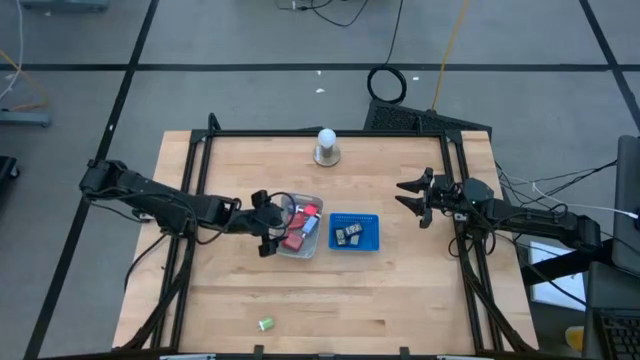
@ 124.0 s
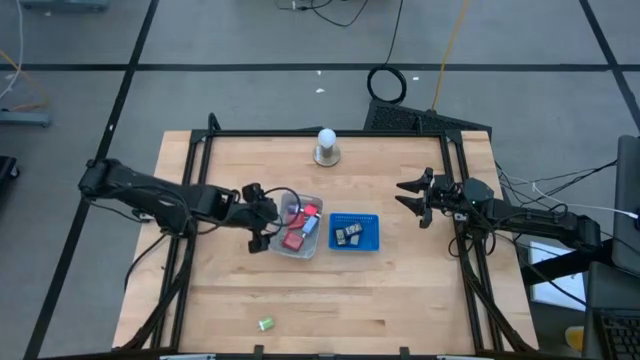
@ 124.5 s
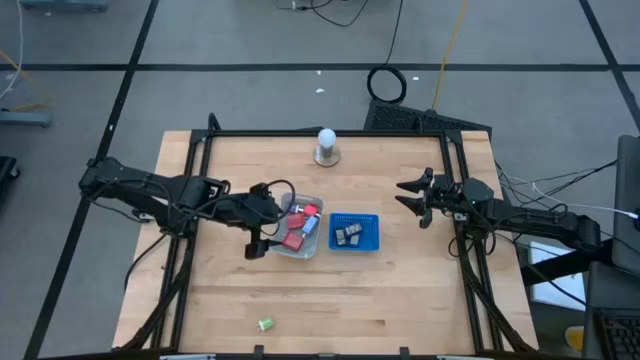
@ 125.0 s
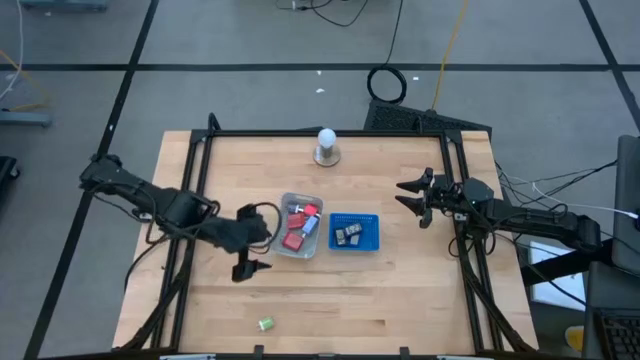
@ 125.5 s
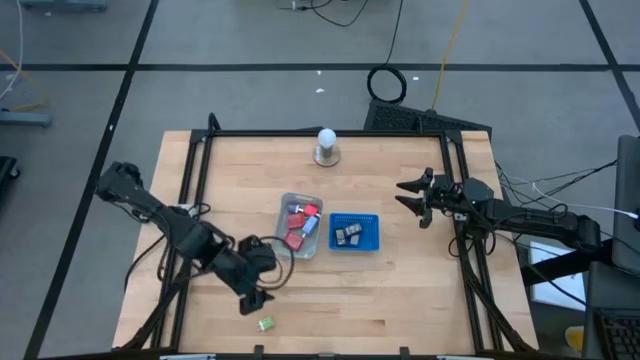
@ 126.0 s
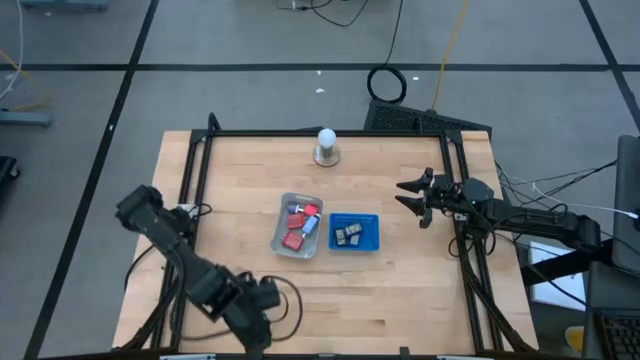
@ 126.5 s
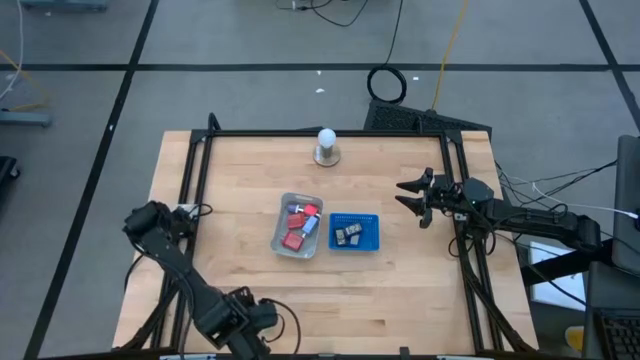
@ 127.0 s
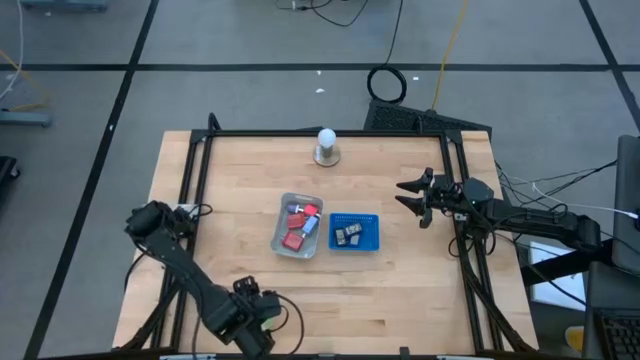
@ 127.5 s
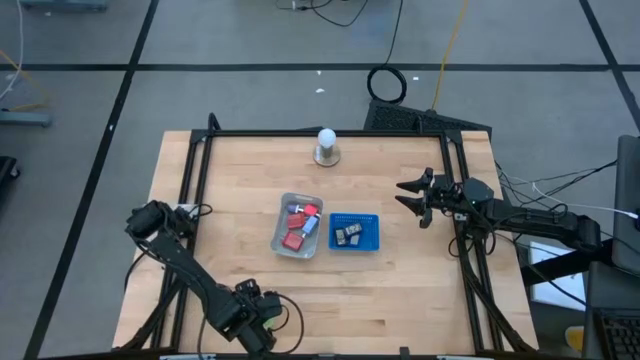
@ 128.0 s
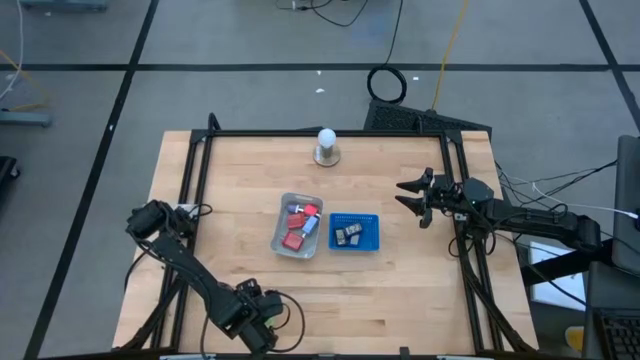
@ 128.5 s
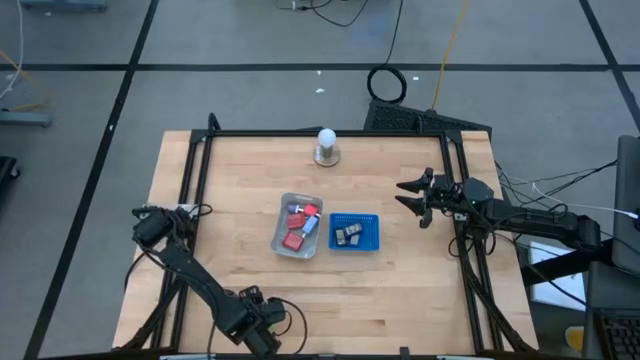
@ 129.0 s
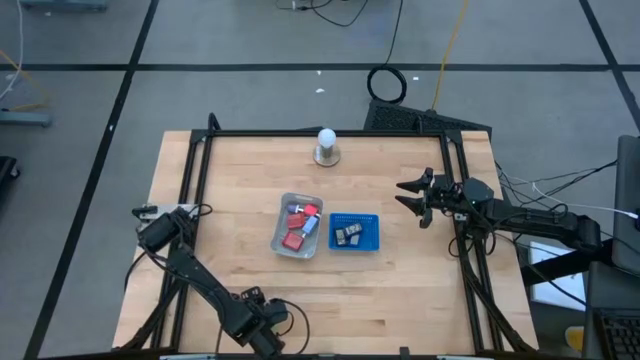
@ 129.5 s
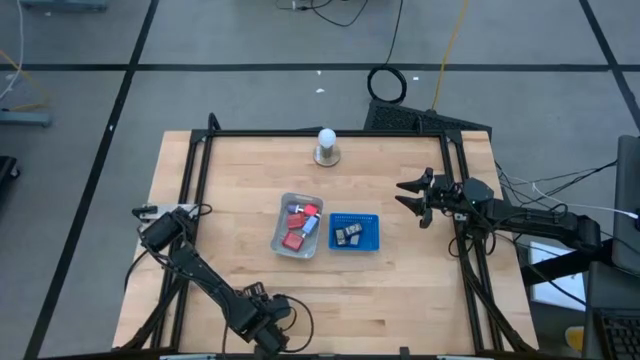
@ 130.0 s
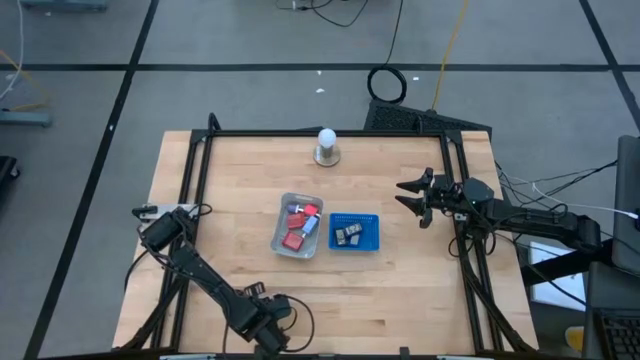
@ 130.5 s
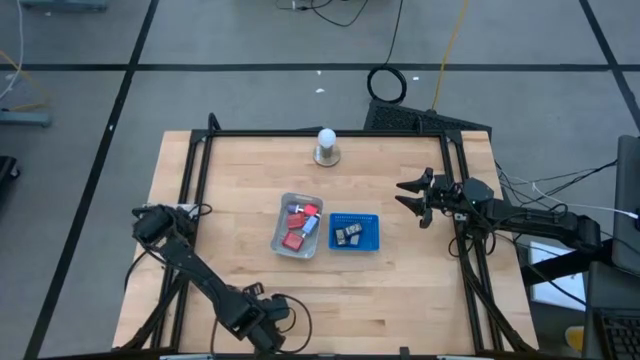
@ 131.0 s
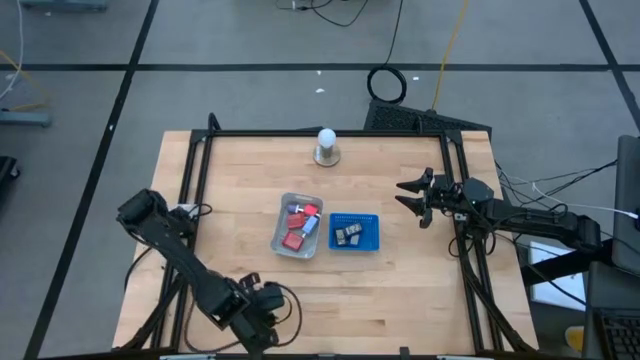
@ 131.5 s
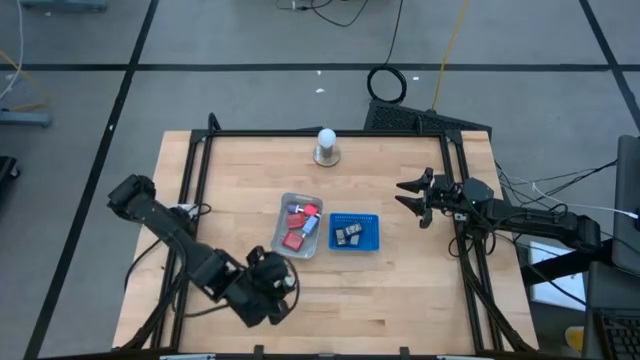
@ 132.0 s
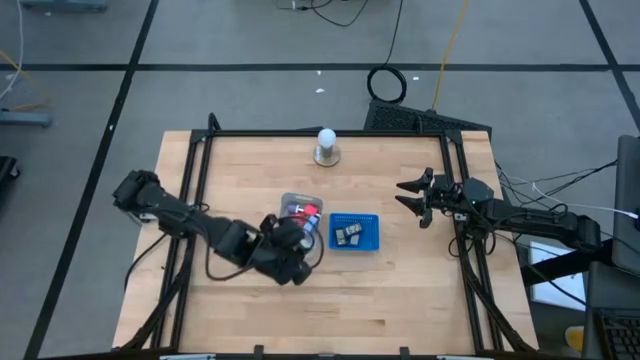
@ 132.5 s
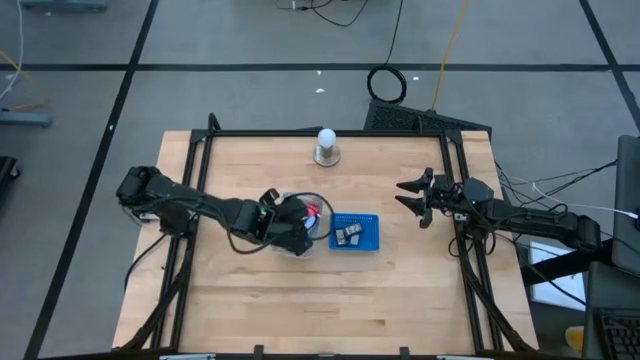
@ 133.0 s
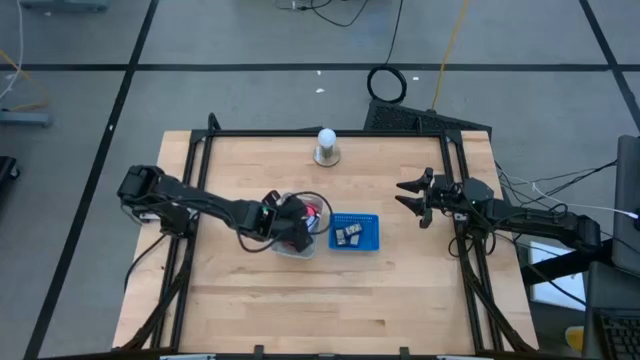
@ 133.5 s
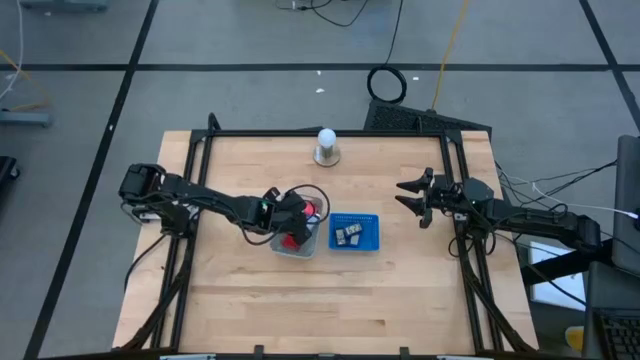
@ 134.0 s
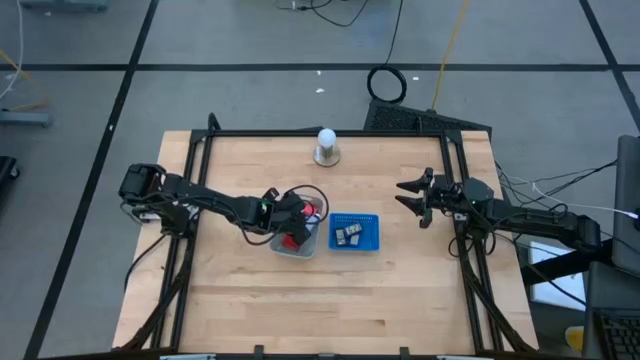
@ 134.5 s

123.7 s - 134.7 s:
Task: Pick & Place Office items
Put the green charger adapter into the gray bin

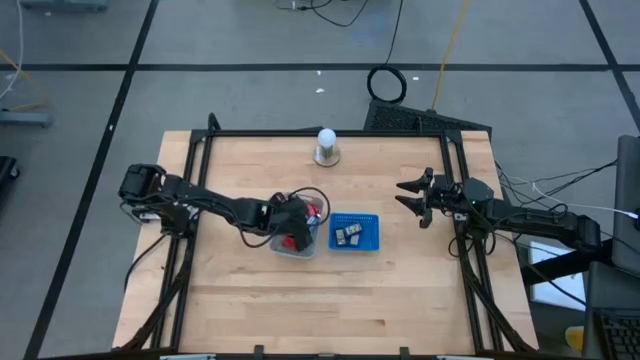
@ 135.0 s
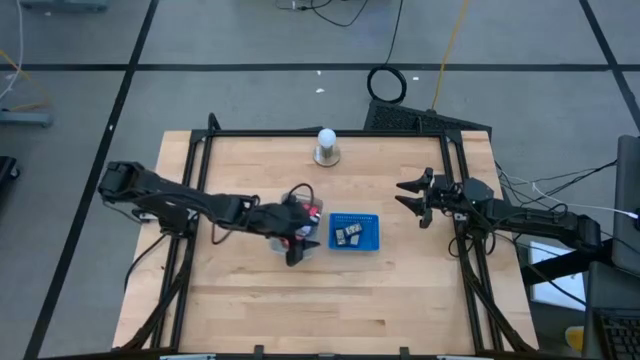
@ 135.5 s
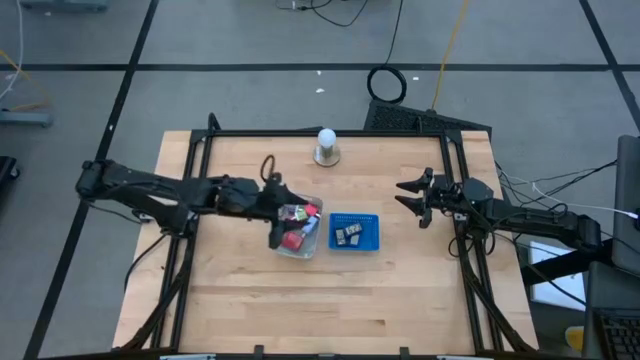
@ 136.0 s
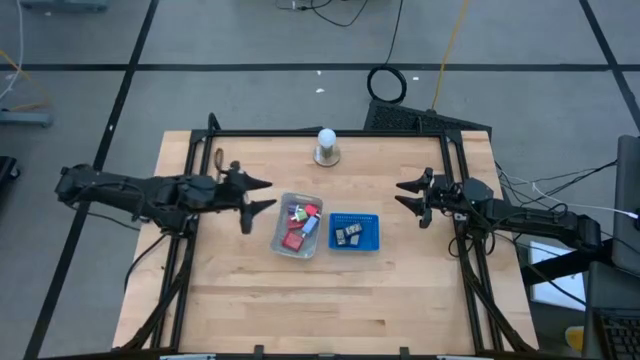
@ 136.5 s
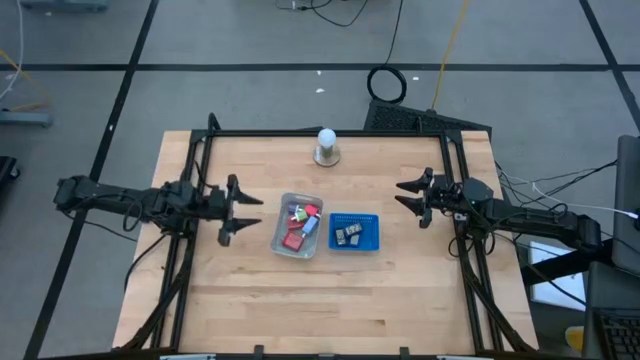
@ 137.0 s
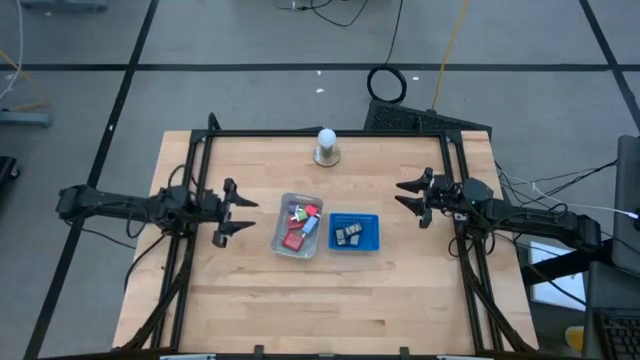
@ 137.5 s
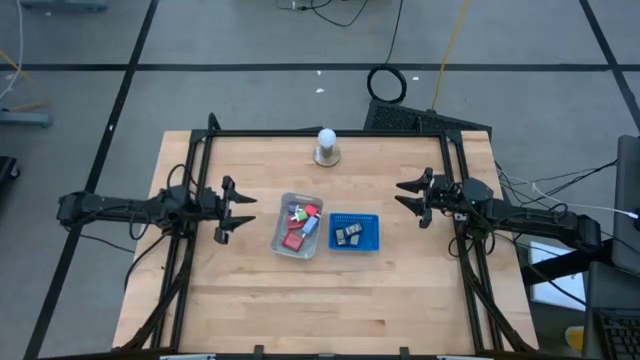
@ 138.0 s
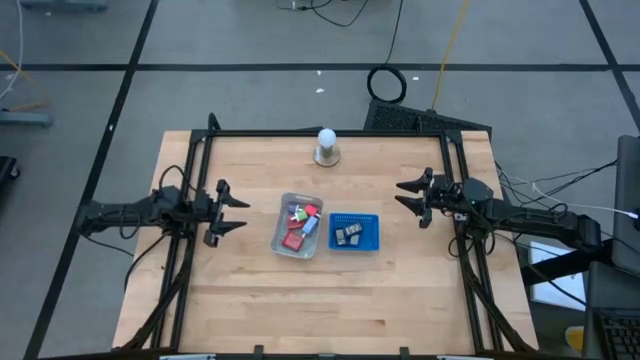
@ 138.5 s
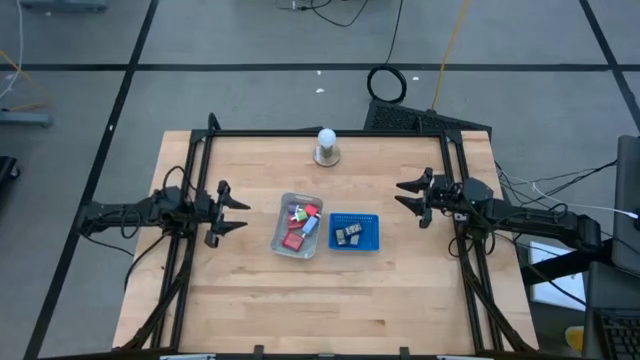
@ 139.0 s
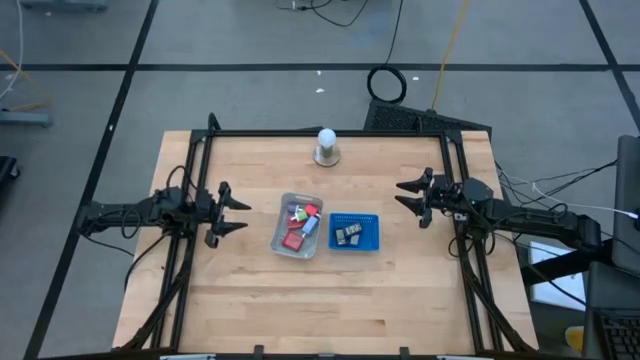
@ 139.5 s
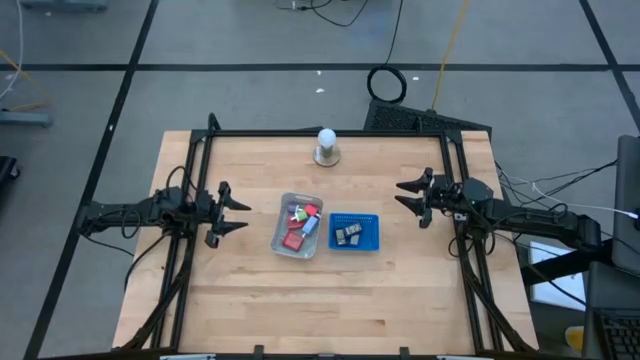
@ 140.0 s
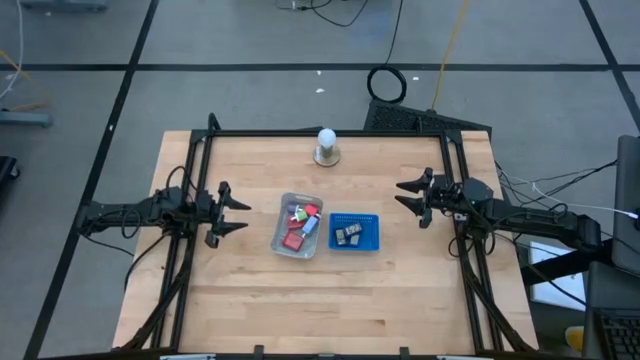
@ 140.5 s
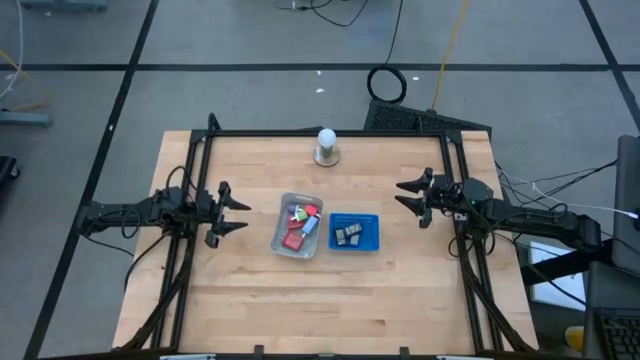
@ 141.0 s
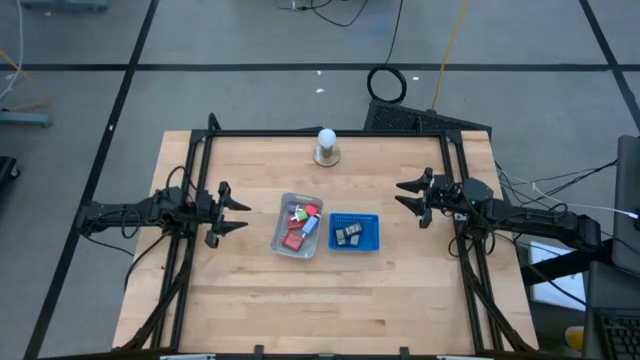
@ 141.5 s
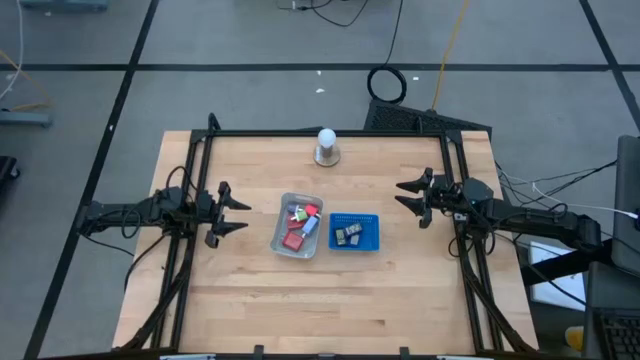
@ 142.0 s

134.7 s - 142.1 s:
Return to Home Position

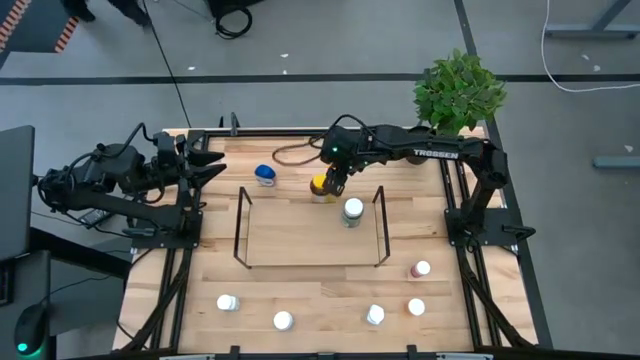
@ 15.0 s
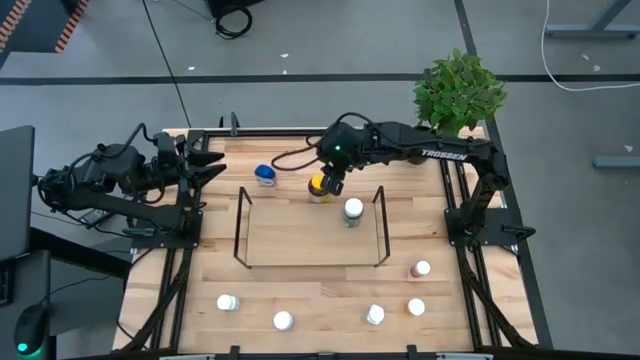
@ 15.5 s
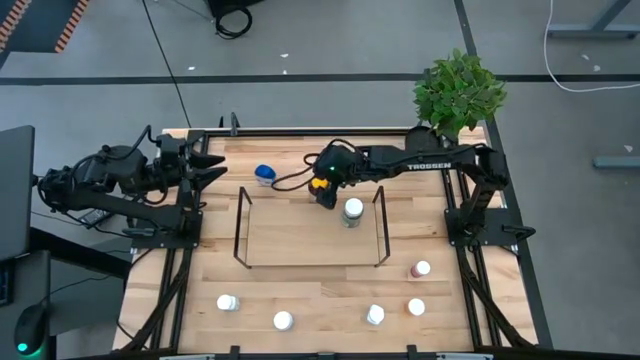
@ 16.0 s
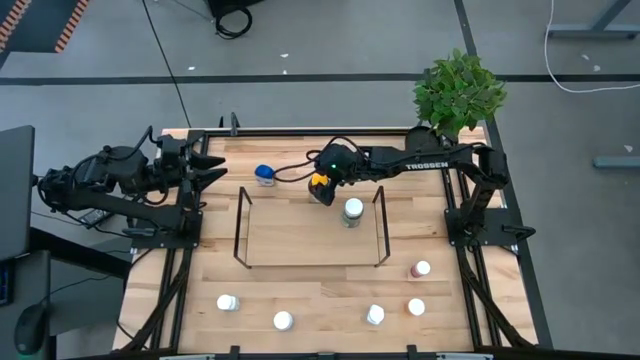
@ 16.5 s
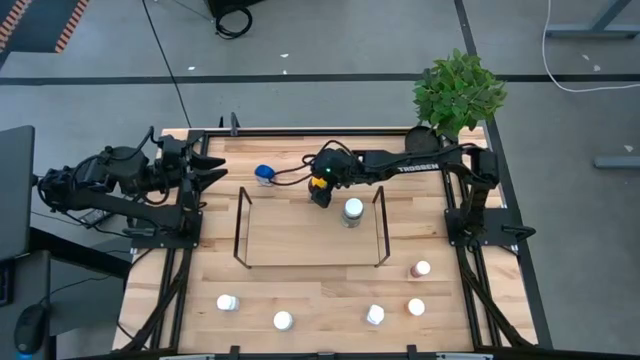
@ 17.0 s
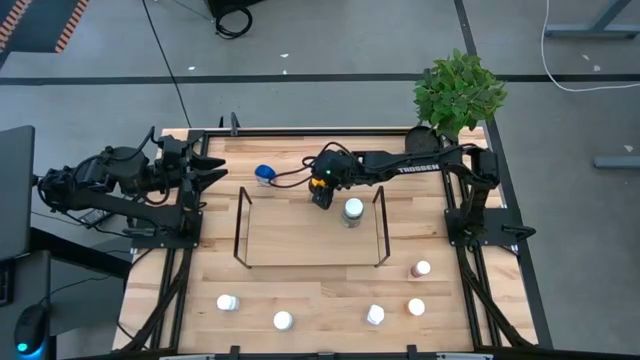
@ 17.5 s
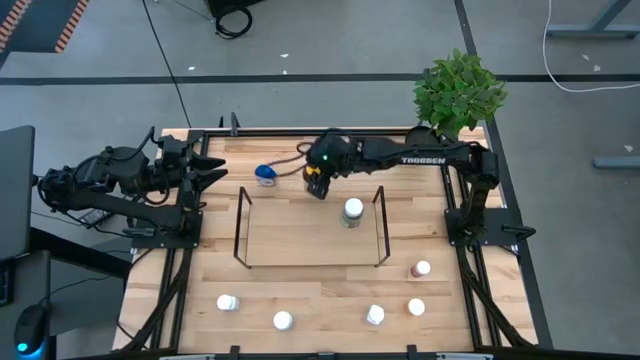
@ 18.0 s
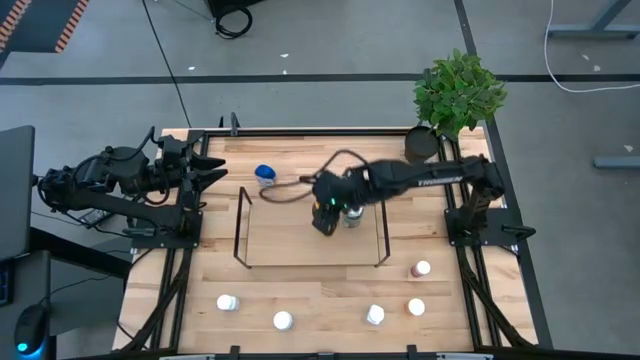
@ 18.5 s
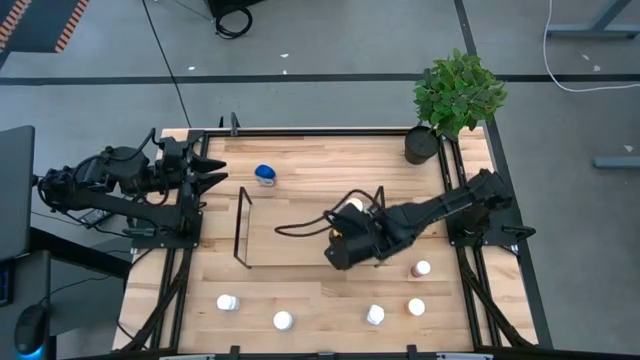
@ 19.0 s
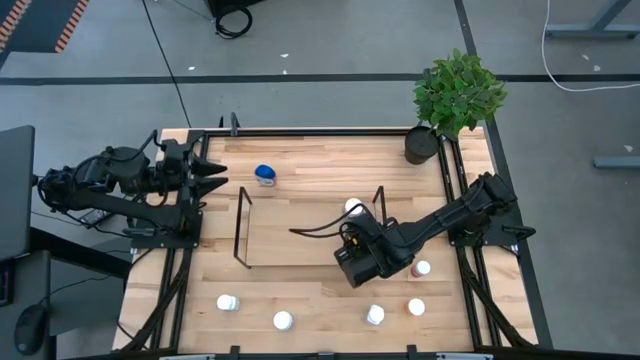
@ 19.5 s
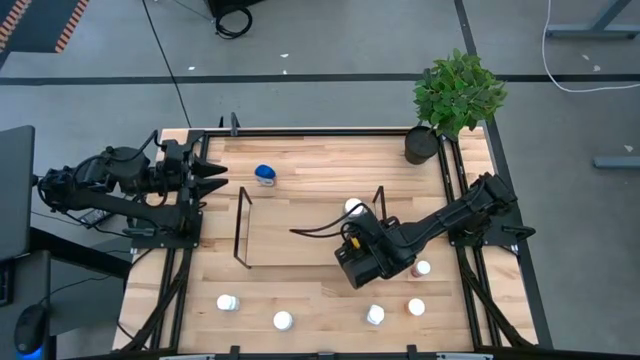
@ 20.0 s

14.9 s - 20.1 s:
Task: Pick and place medicine bottles onto shelf by color
Put the yellow medicine bottle on the shelf
